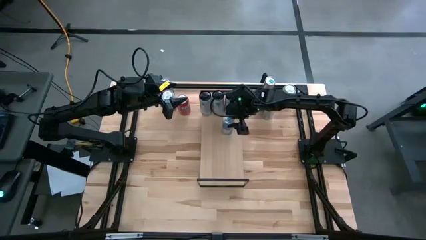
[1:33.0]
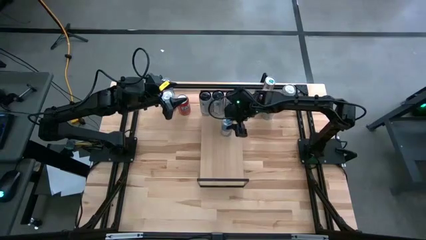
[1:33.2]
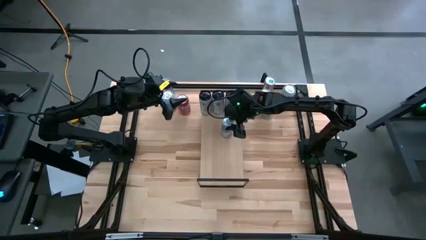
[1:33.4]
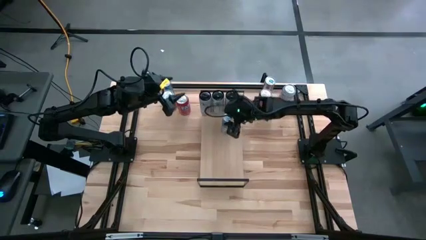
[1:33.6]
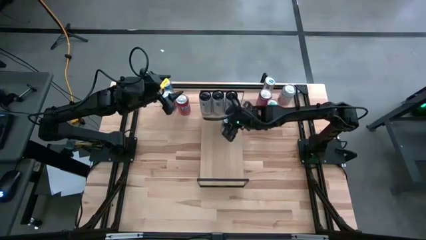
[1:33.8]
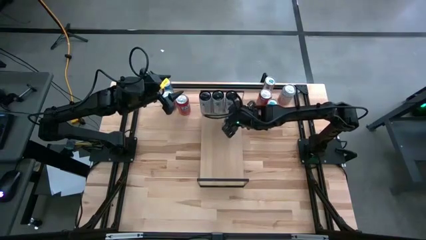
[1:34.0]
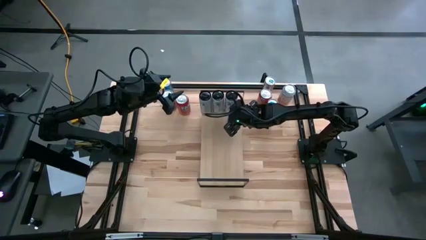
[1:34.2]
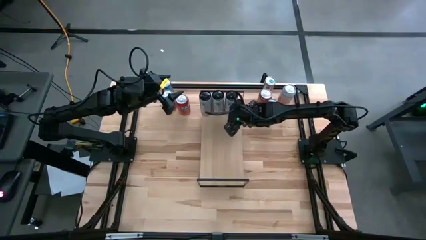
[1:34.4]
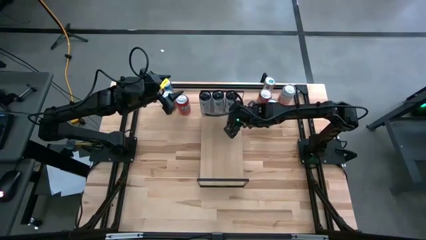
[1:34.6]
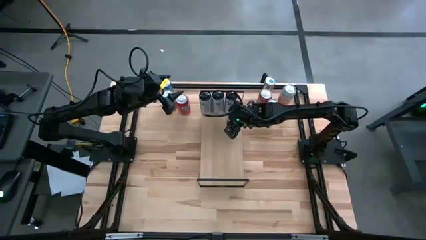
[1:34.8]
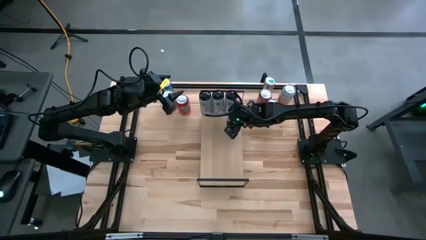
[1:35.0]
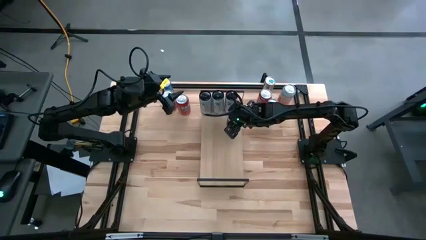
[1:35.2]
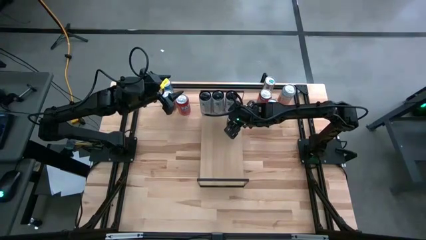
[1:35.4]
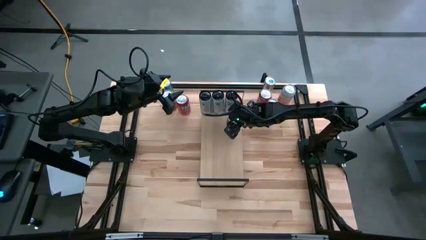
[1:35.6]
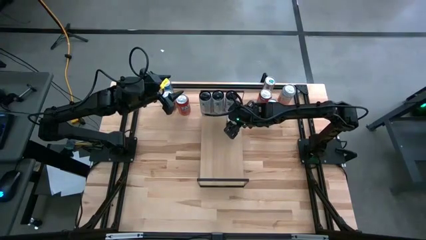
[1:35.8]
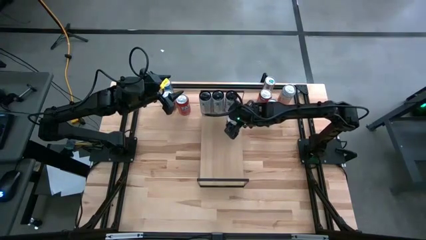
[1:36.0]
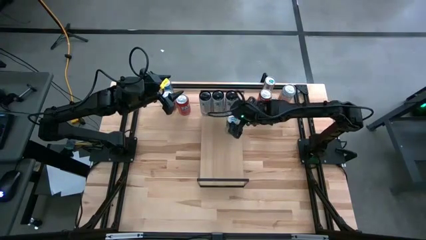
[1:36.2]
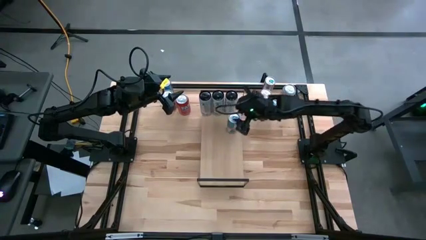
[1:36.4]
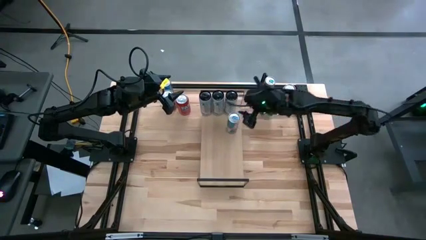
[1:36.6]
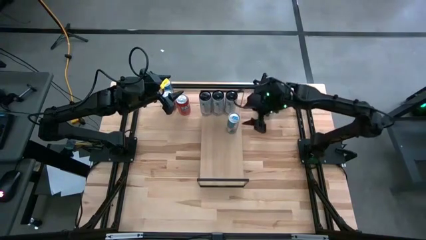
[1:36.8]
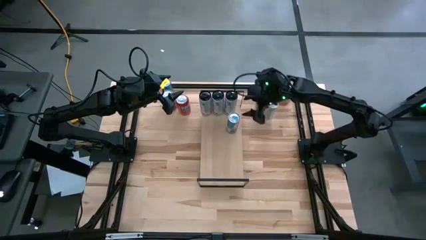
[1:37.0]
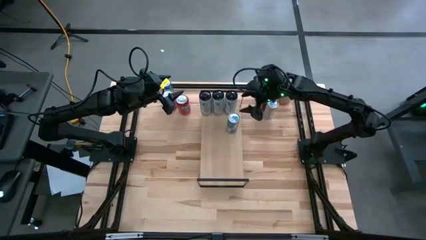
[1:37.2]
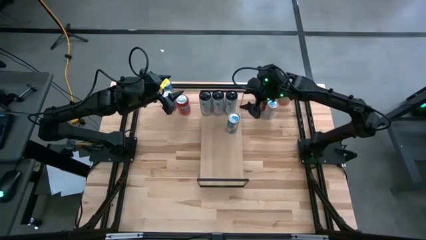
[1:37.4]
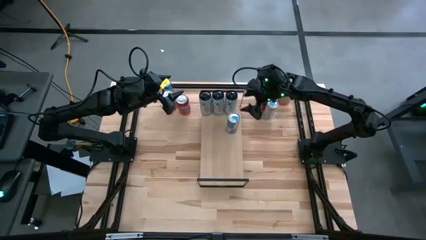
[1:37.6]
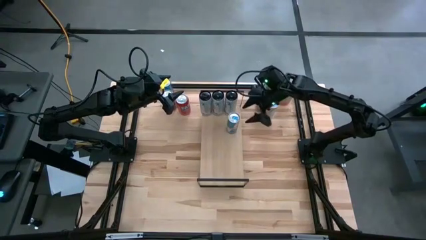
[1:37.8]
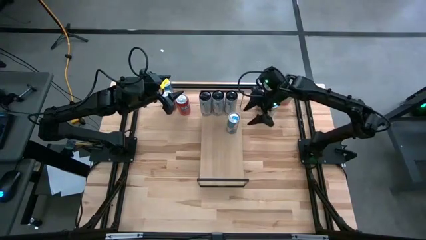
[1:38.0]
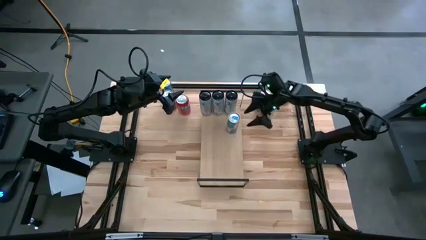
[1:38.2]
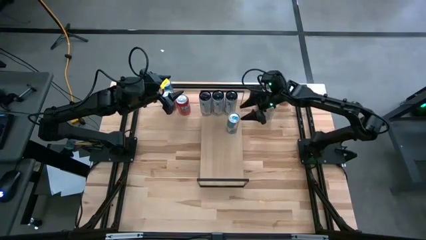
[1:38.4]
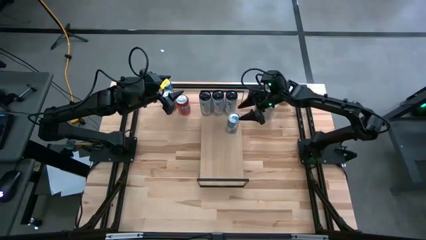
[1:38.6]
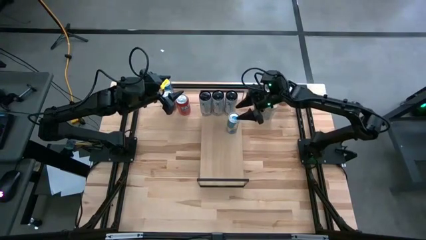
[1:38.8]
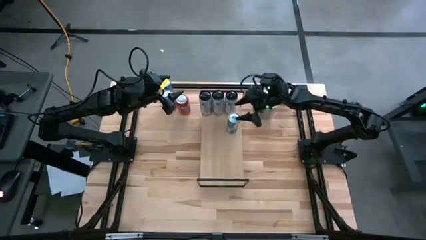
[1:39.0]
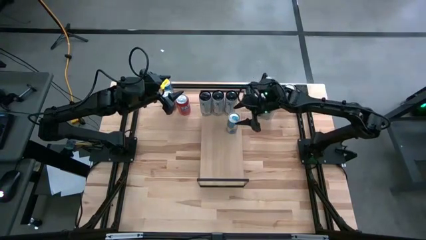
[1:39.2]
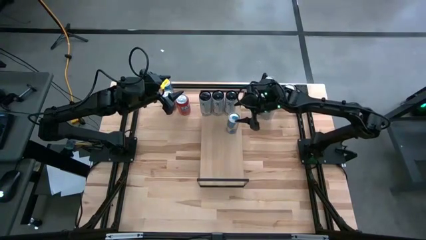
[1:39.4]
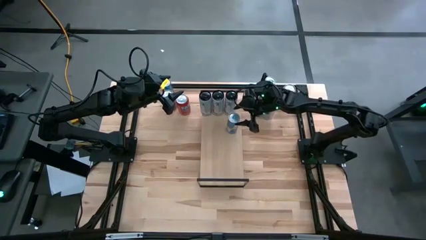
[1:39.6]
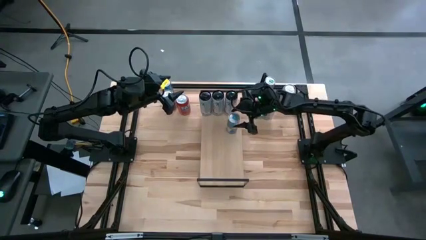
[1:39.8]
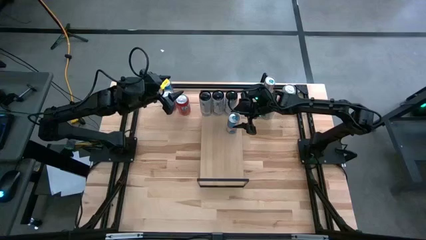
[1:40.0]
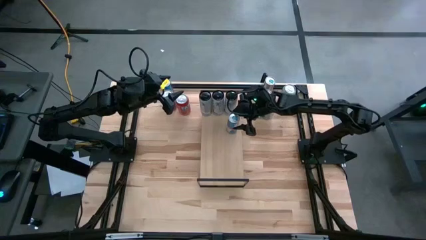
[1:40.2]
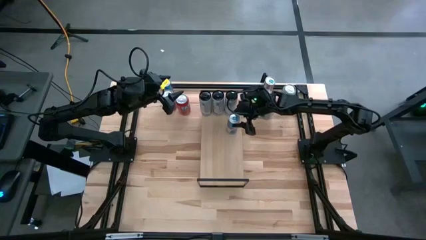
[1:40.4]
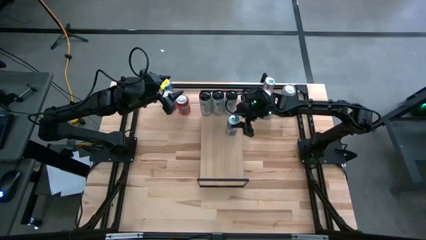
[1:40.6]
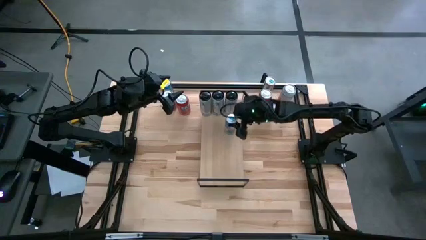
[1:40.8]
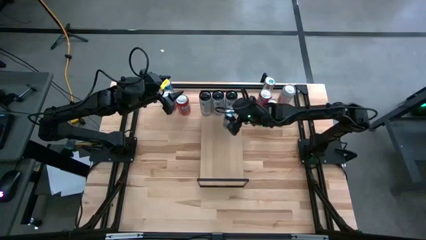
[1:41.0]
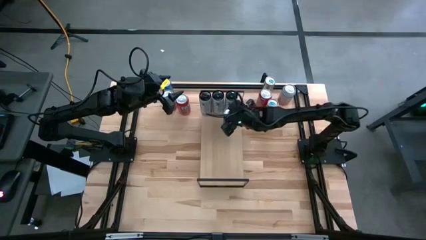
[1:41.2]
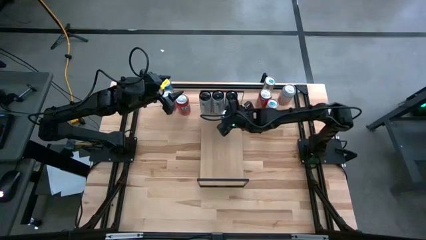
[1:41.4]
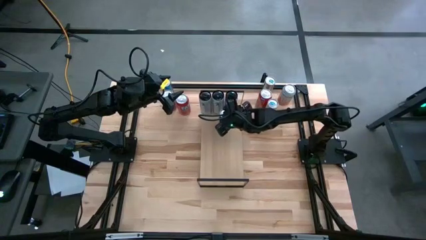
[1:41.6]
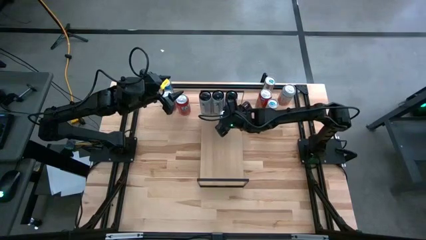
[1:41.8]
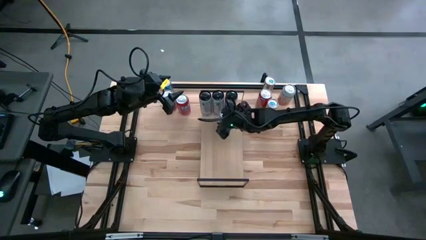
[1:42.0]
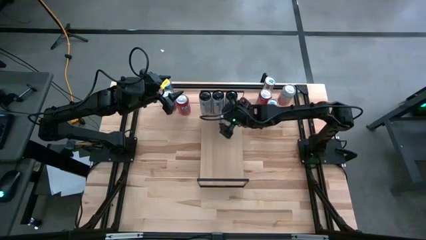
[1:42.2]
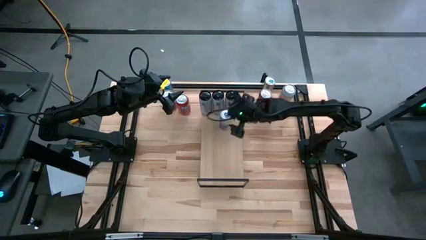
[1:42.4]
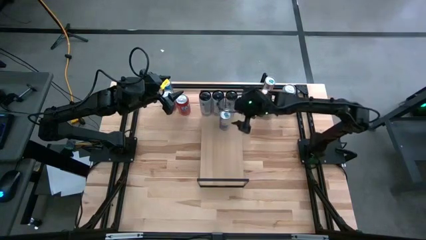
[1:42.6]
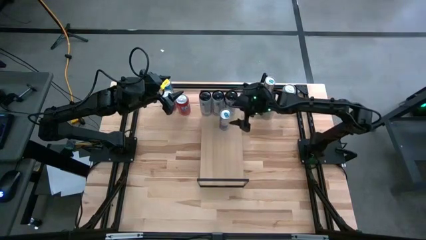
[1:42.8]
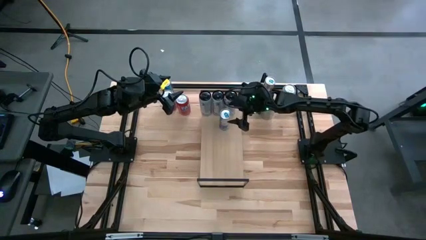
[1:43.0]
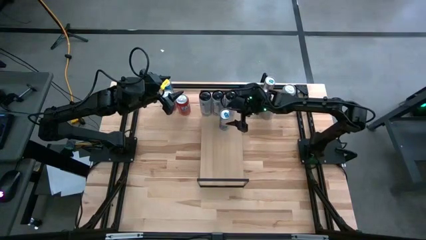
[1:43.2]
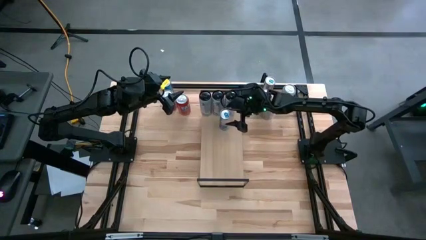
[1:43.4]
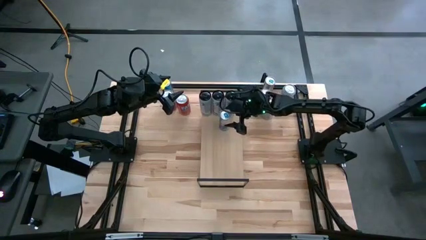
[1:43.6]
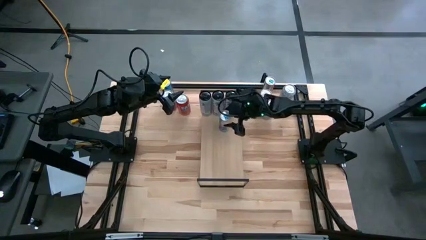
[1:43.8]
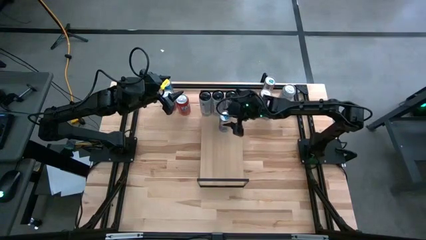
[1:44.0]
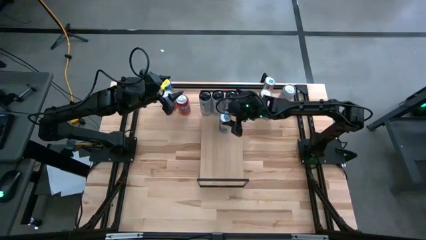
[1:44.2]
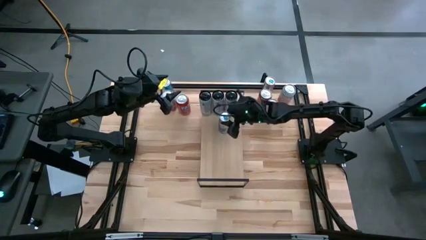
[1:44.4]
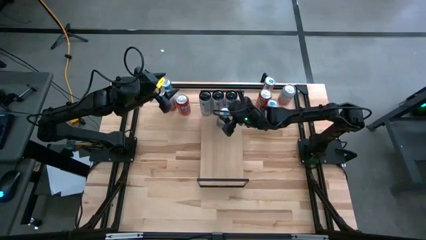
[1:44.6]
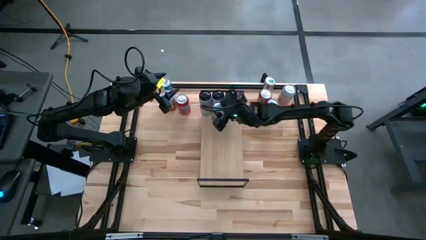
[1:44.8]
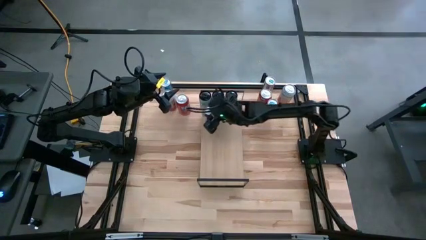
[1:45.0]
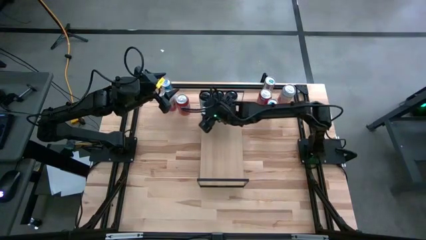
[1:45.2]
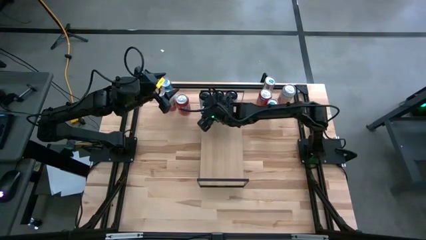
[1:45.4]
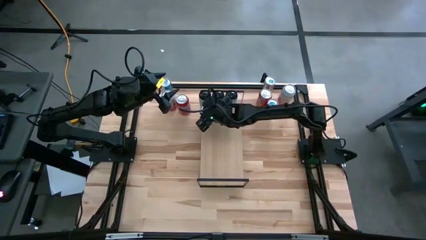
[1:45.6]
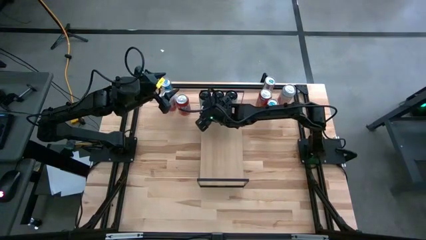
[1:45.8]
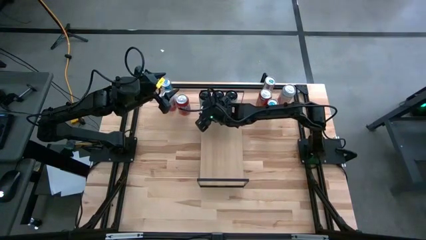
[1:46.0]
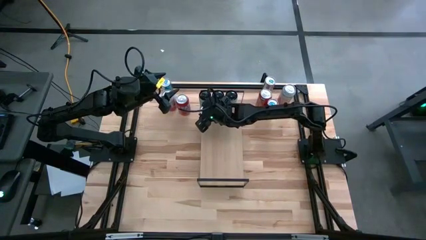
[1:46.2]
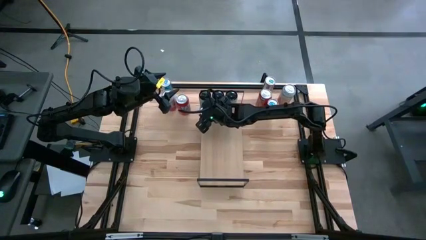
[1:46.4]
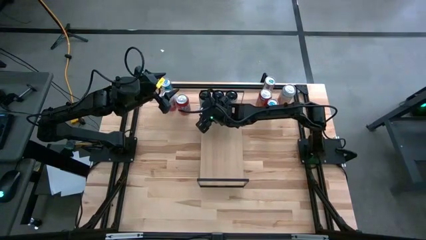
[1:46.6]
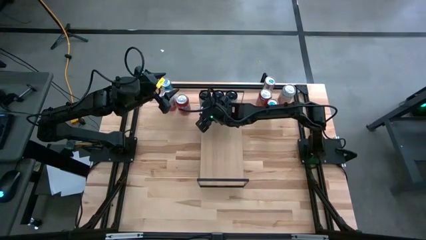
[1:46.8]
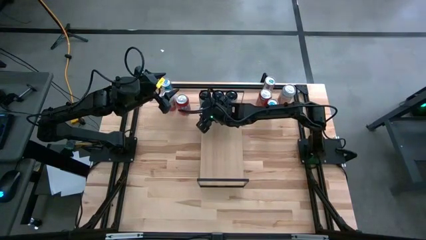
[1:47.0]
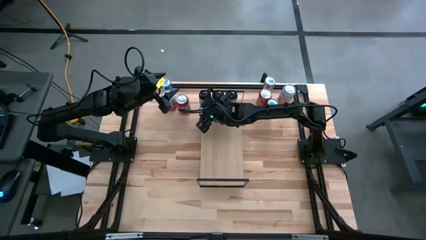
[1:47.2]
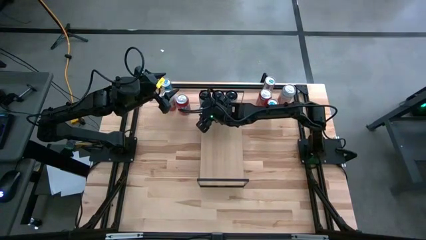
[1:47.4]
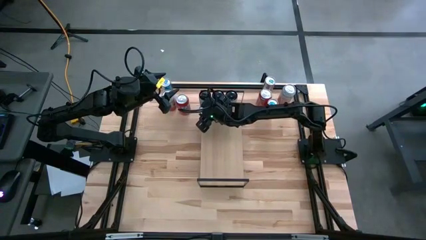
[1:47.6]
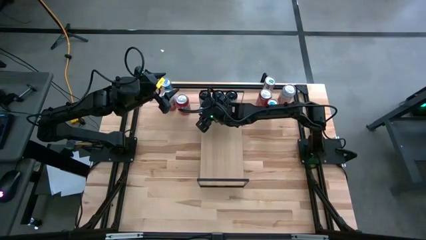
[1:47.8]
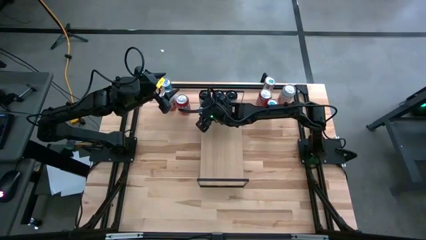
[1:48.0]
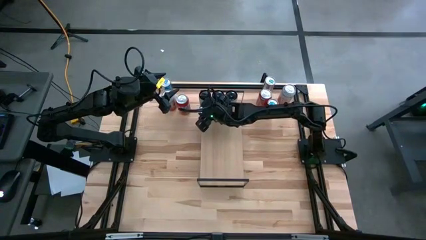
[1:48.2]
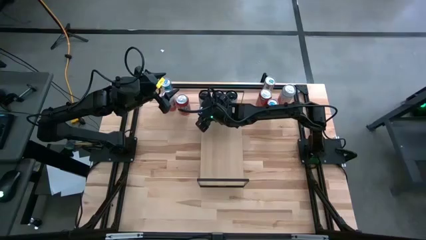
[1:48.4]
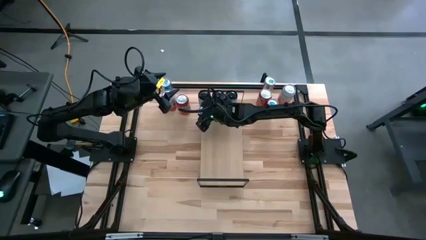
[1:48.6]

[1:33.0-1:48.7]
Task: Place canned beverage on shelf
Put the bottom left blue soda can on the shelf

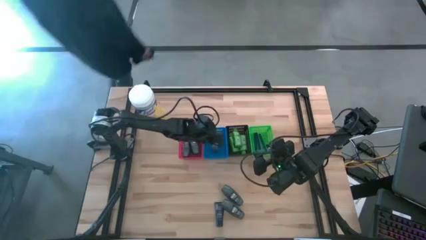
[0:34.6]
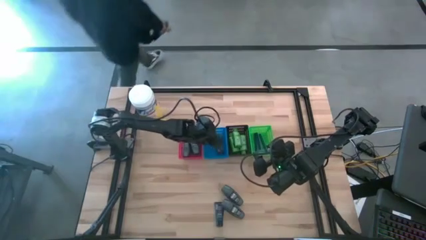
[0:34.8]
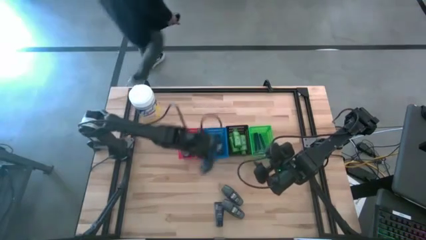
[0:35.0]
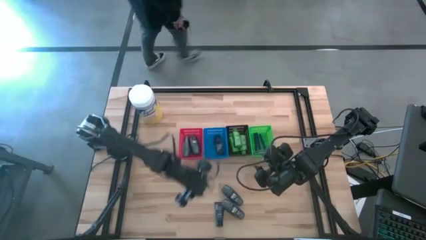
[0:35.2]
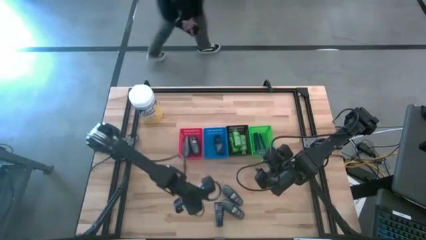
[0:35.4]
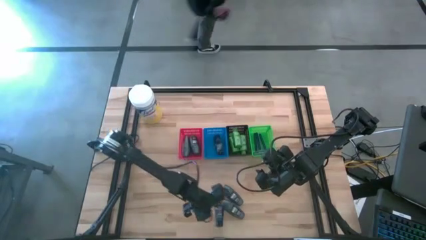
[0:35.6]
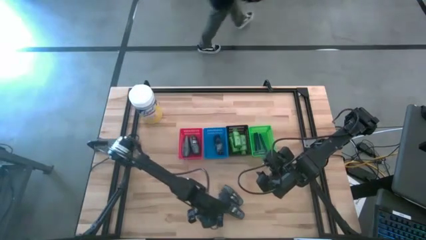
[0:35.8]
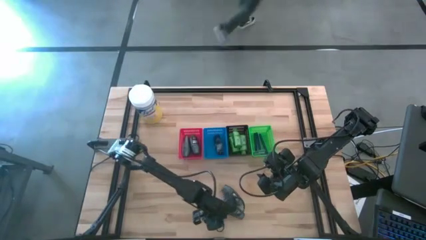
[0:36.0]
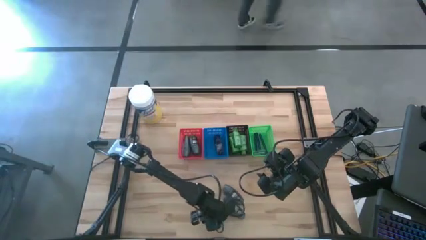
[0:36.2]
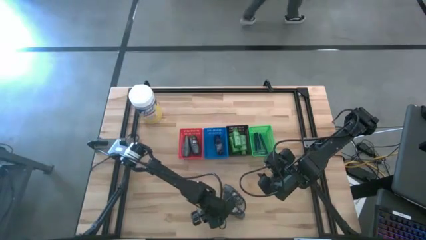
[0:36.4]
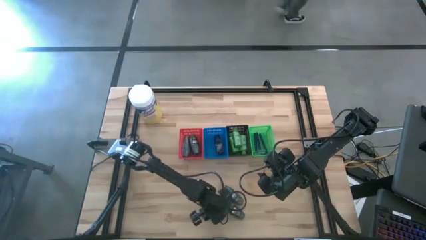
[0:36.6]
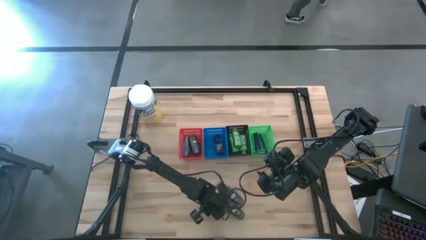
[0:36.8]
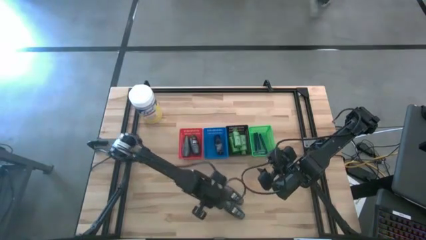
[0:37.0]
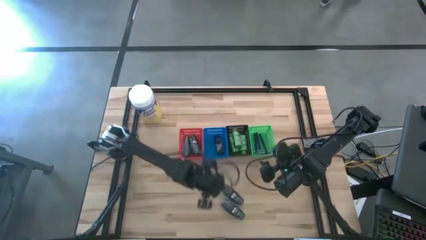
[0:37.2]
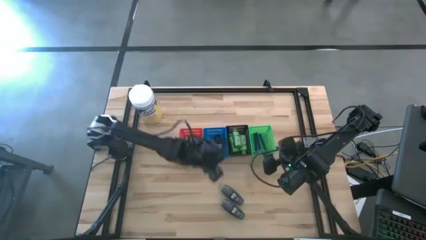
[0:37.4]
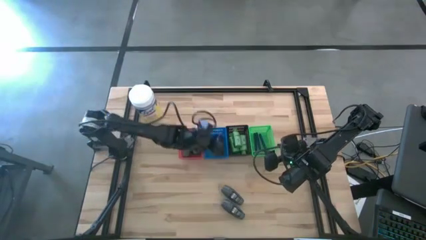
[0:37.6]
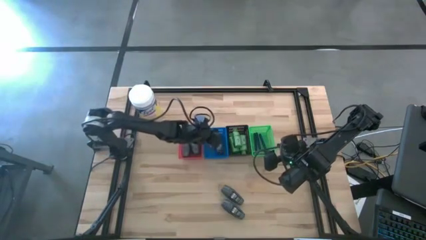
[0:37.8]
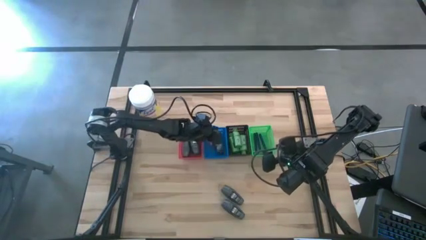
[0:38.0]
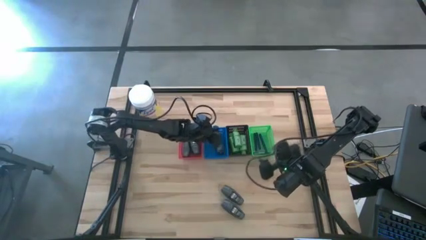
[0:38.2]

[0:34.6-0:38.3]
Task: Pick & Place Travel size toiletries
Put the blue shave cream into the blue bin
